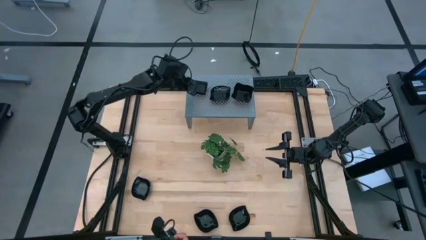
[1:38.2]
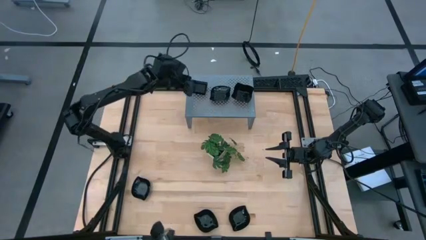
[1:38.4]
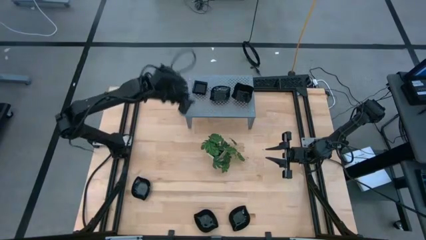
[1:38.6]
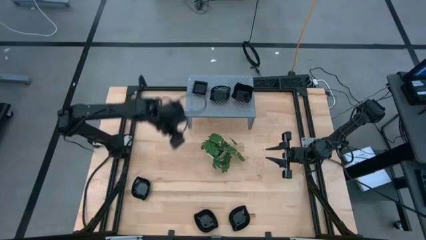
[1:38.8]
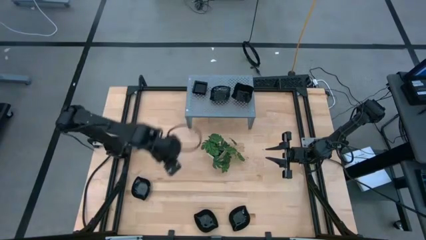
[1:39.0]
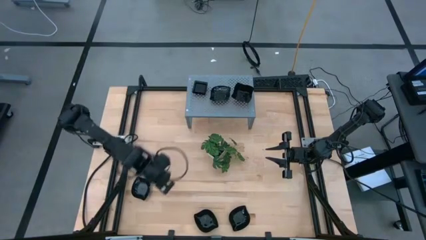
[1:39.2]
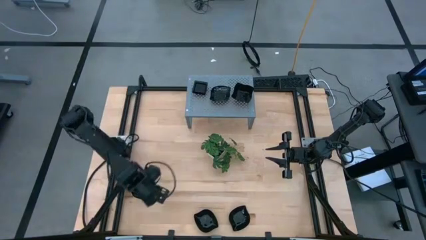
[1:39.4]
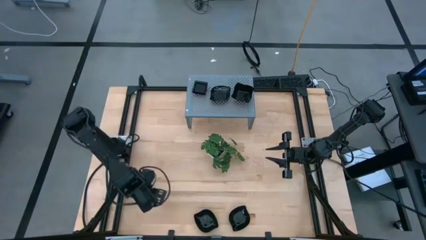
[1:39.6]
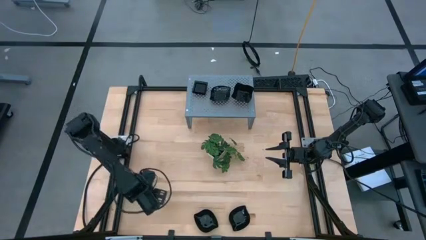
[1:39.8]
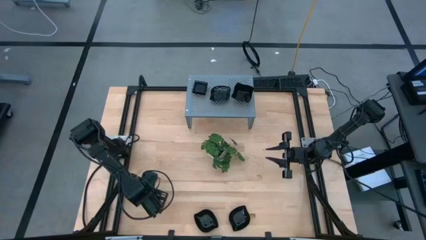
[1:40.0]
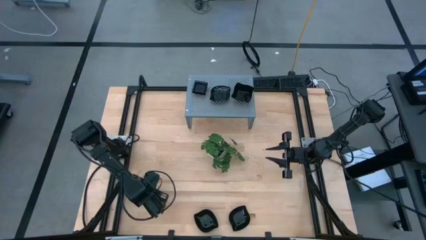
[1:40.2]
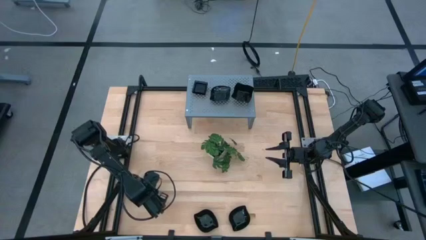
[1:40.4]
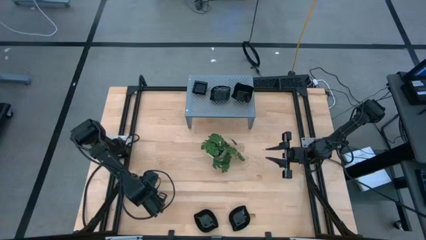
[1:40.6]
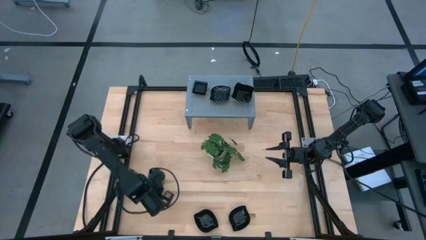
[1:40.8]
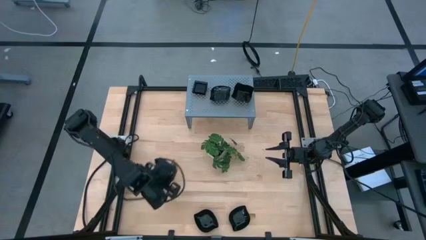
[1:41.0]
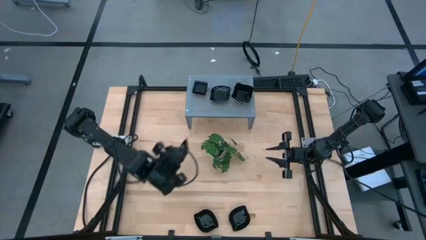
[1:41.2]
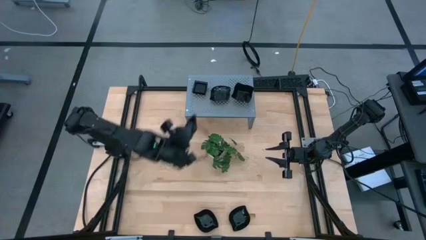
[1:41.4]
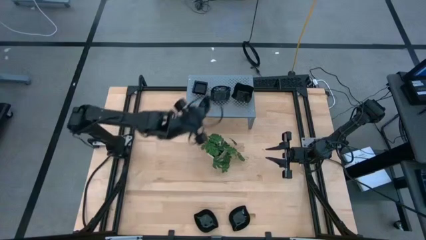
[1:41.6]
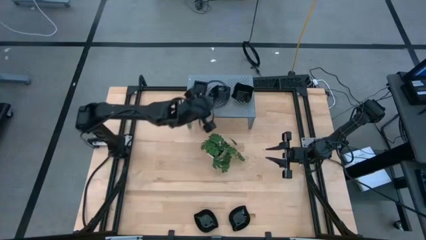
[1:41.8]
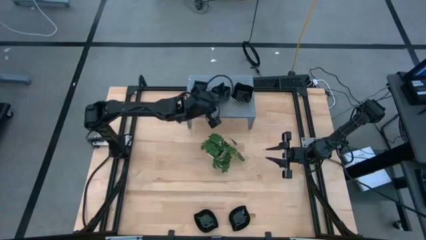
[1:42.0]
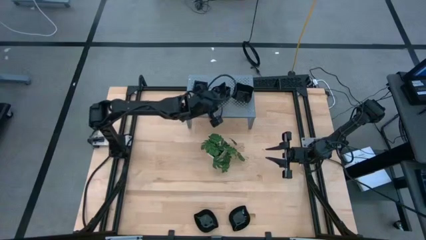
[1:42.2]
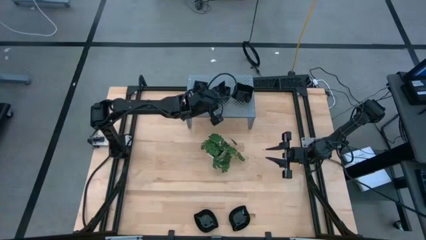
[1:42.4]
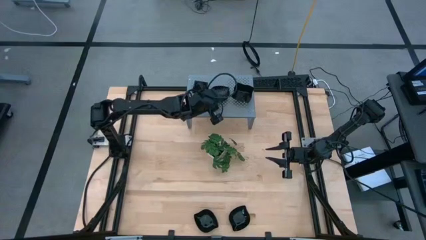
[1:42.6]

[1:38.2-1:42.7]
Task: Pick & Place Mini shaped plates
Stack the leaf-shaped black bowl on top of the other leaf-shaped black bowls on the shelf

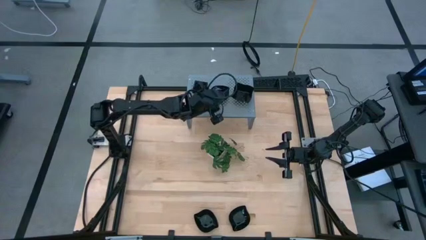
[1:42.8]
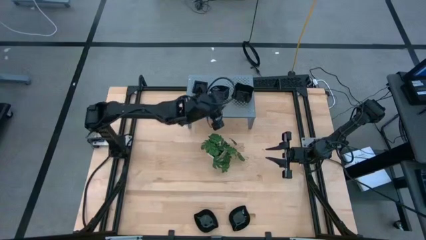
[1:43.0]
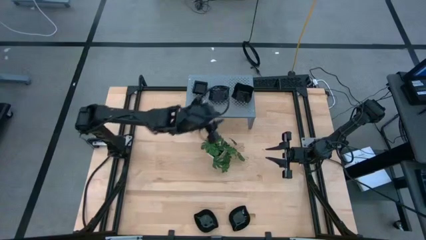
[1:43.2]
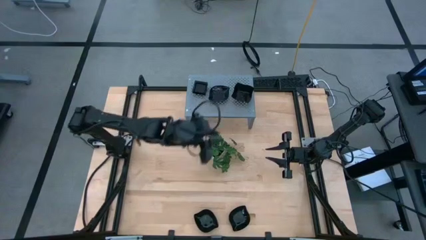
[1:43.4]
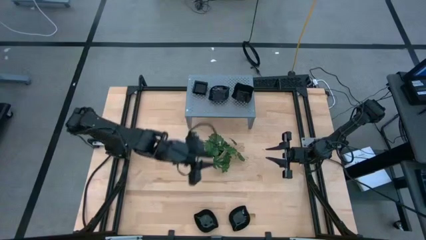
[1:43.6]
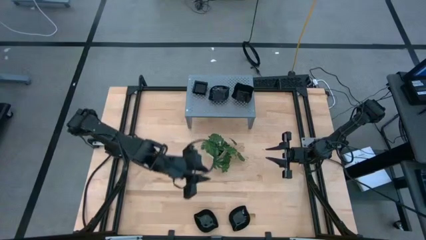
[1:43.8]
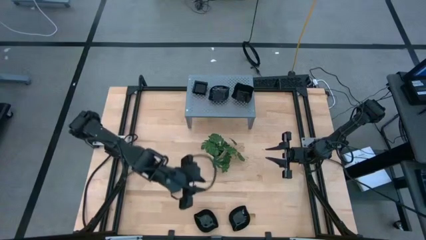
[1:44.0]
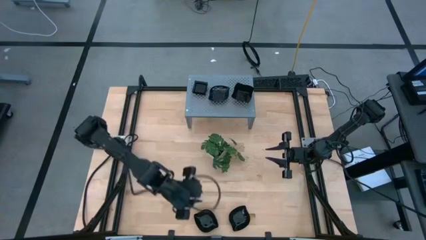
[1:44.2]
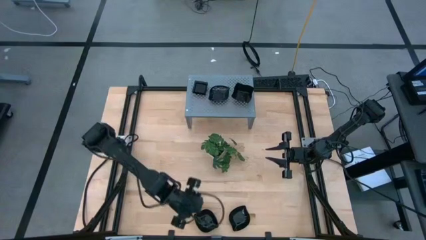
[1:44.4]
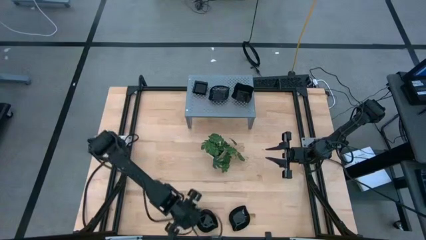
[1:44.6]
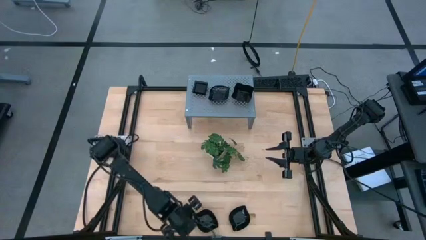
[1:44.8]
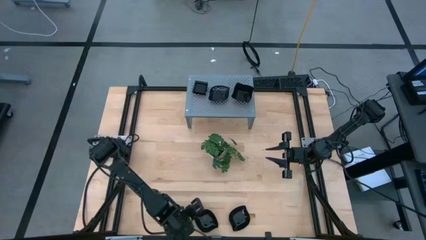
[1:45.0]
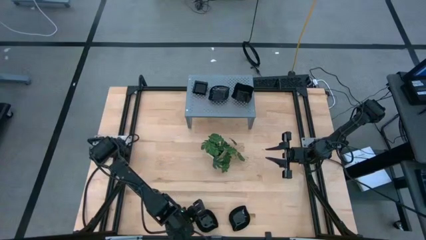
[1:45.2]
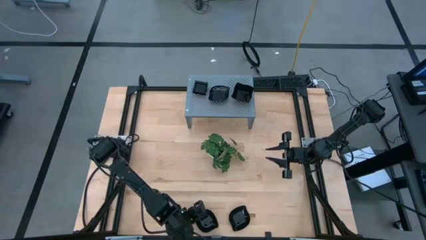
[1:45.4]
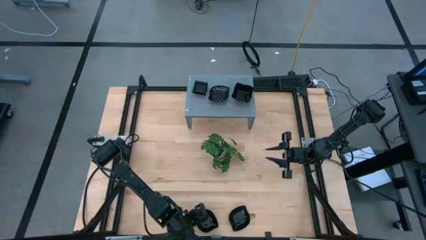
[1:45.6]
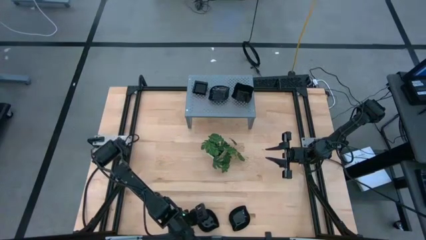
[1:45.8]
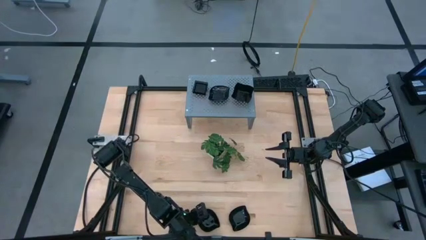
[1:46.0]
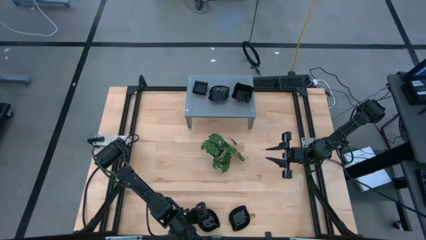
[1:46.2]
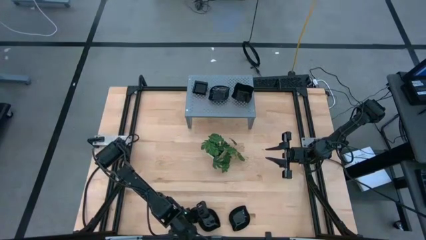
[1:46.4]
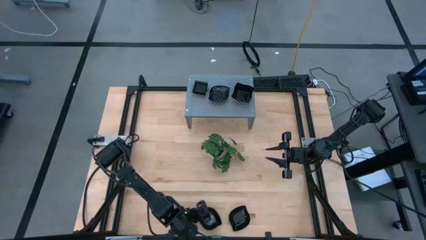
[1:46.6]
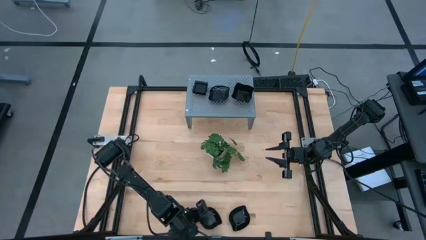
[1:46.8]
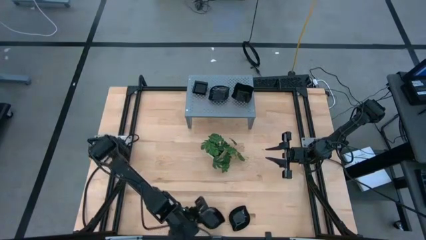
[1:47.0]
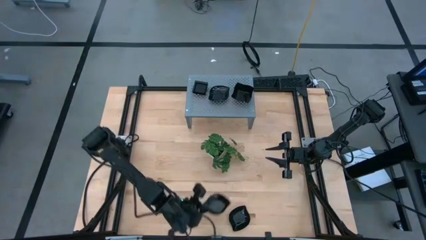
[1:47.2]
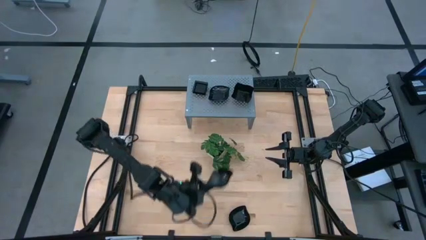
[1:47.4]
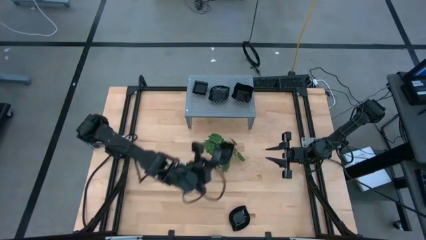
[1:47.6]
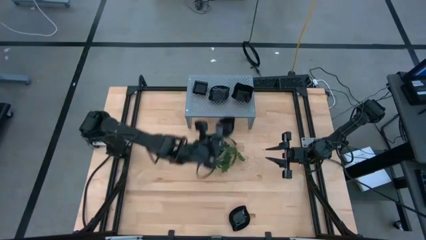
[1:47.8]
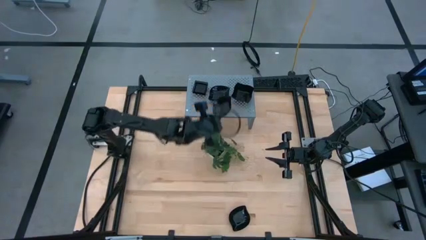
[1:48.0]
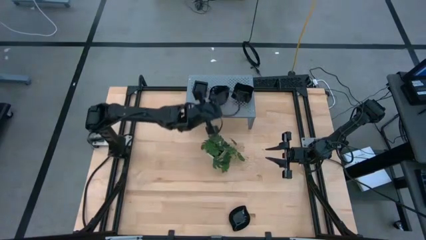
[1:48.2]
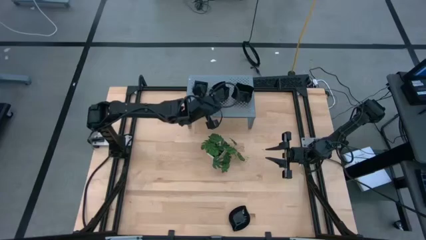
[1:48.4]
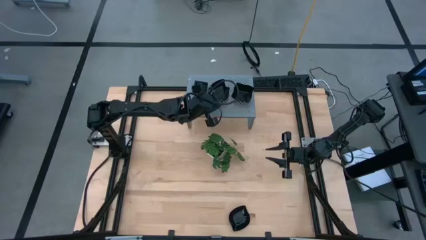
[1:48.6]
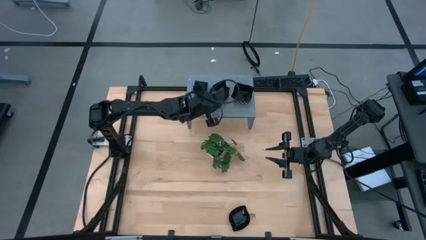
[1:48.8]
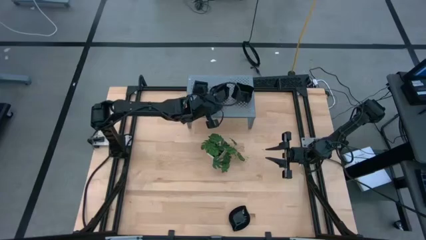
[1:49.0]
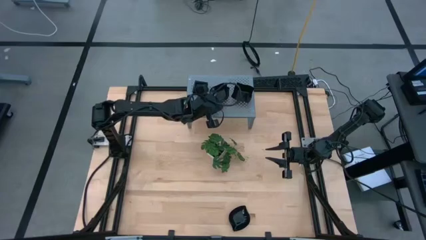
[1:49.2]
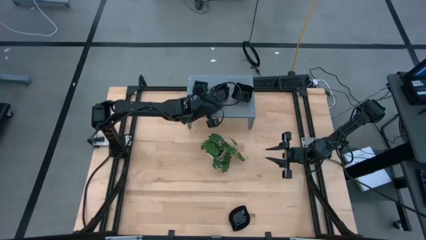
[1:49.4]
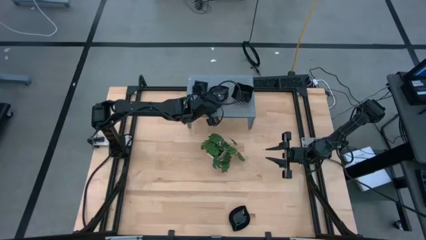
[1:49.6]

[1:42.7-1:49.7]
Stack the leaf-shaped black bowl on top of the other leaf-shaped black bowls on the shelf

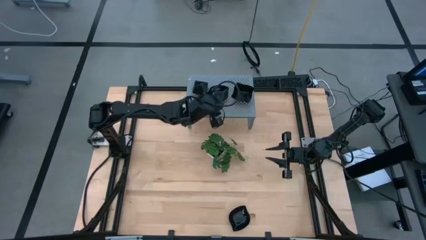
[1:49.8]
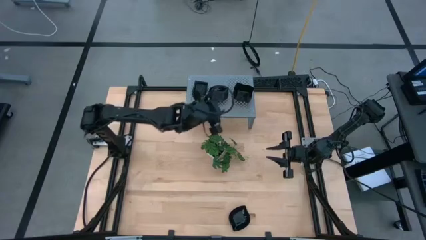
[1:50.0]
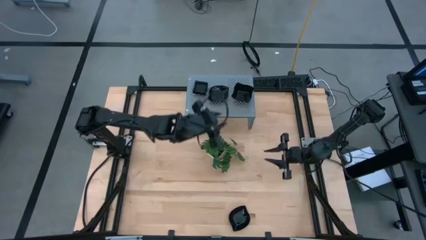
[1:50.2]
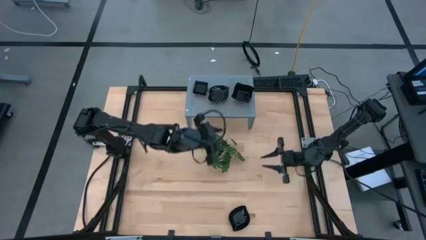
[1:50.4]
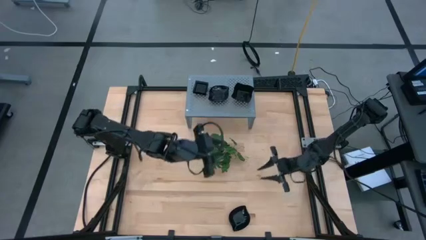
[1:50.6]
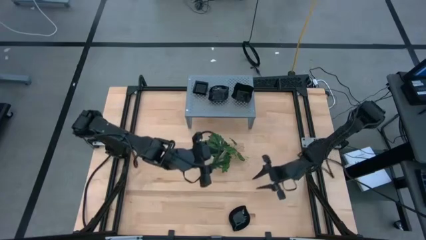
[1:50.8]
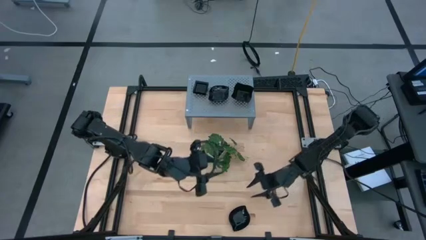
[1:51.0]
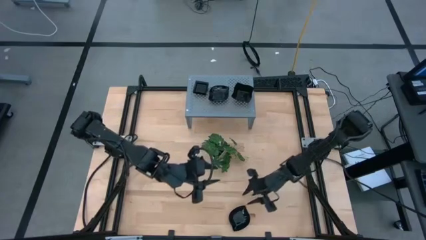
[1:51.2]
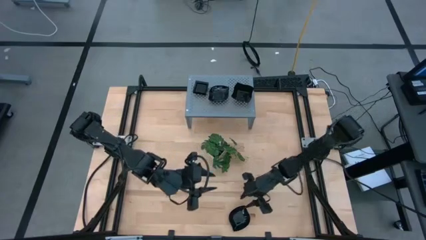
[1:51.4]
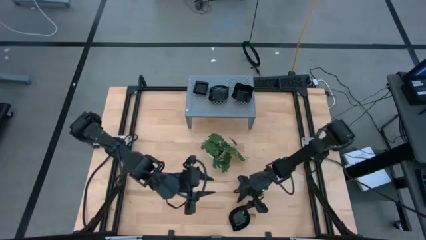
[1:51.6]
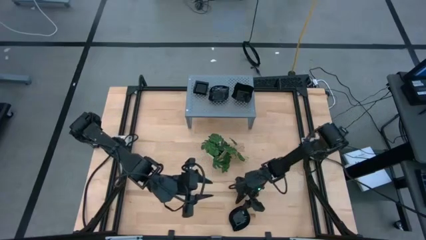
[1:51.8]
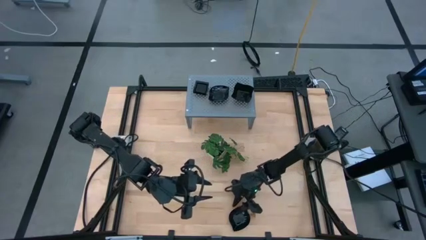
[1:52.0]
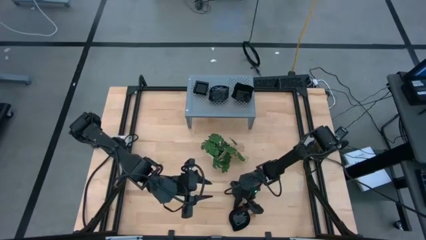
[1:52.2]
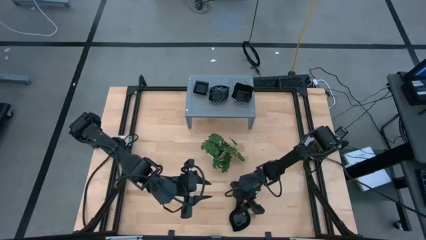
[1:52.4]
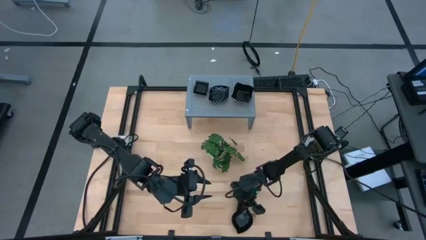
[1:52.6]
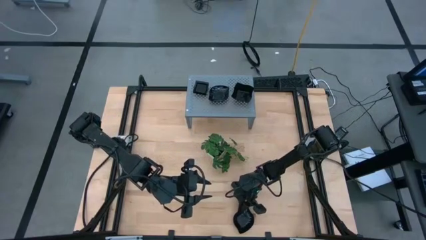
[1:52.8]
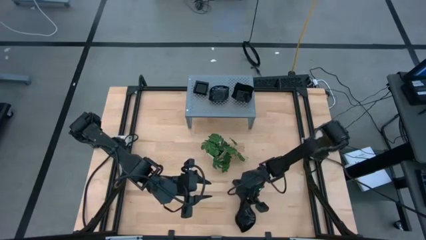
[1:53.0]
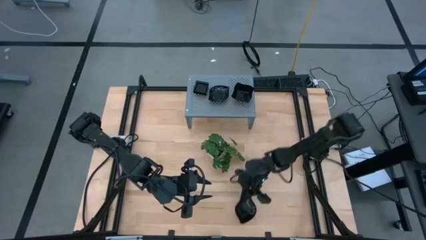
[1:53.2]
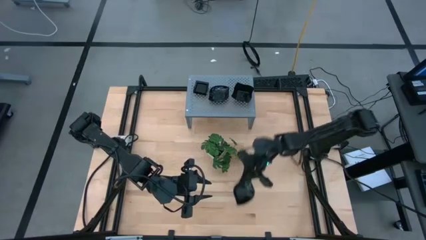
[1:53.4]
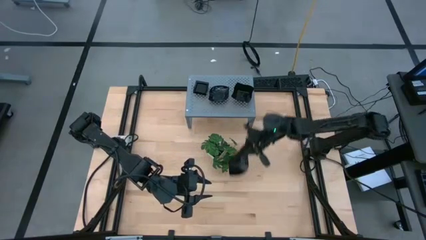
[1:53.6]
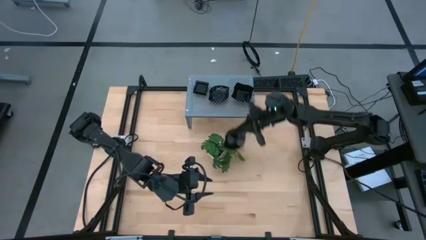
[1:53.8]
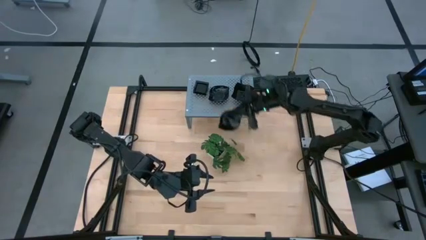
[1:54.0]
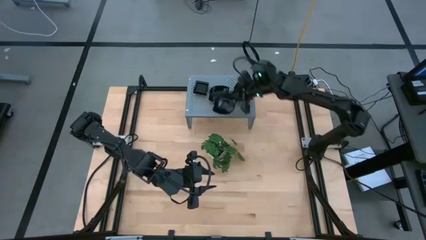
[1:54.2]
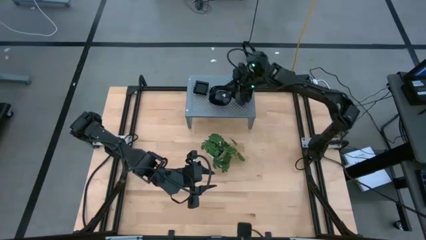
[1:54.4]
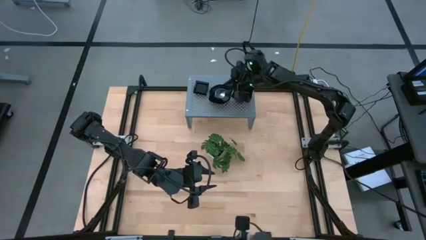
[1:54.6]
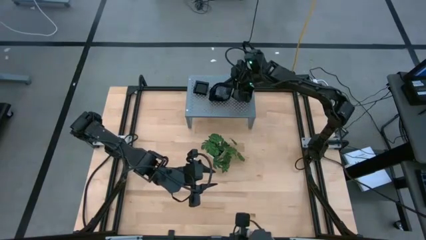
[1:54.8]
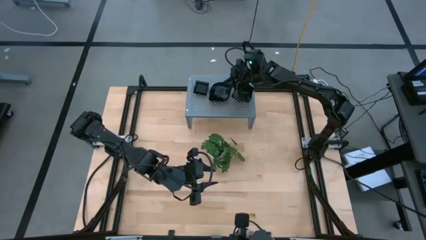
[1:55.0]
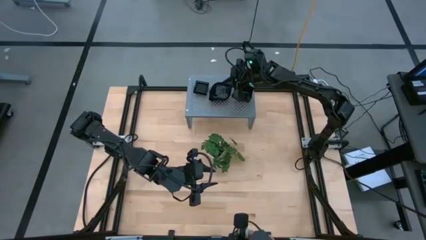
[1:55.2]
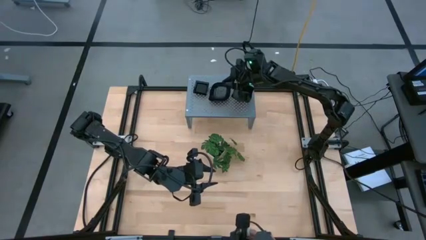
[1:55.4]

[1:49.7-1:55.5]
Stack the leaf-shaped black bowl on top of the other leaf-shaped black bowls on the shelf
